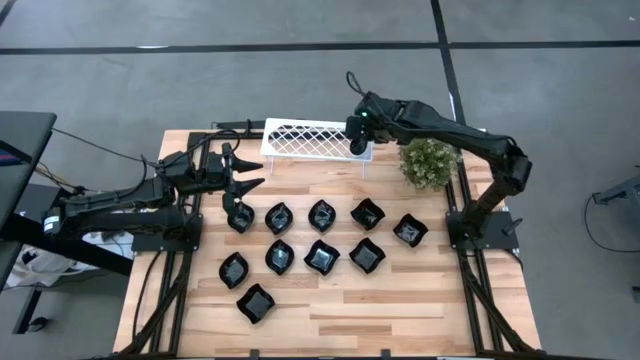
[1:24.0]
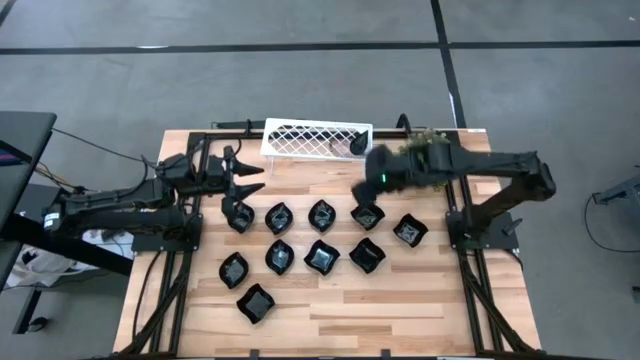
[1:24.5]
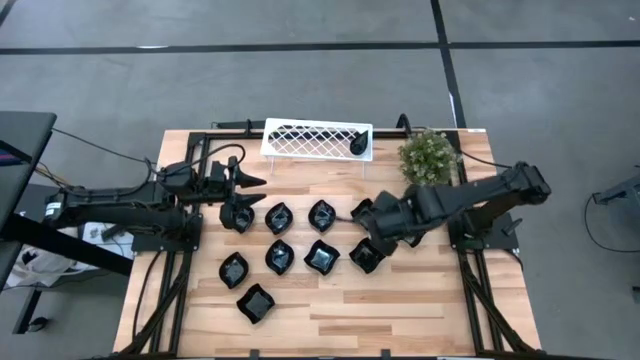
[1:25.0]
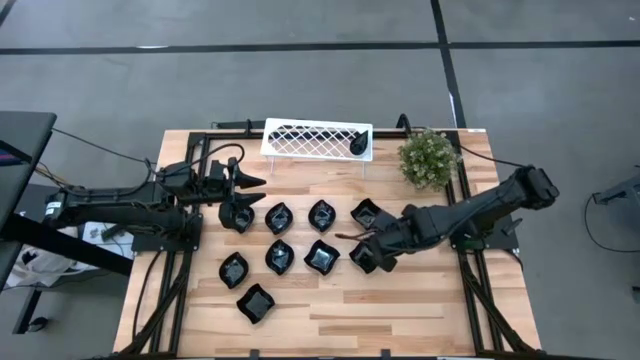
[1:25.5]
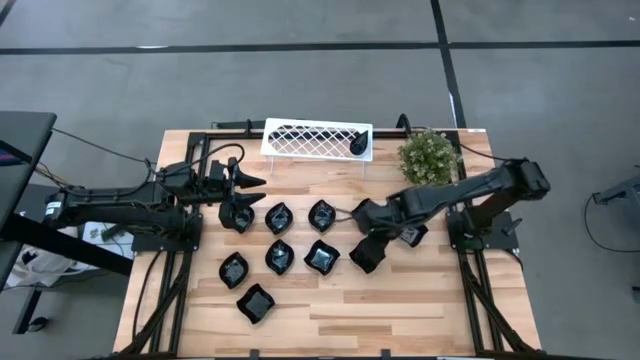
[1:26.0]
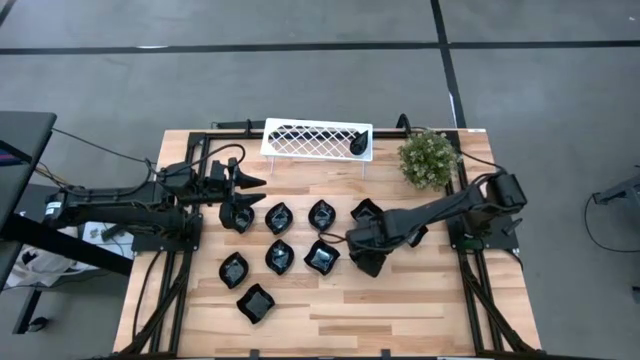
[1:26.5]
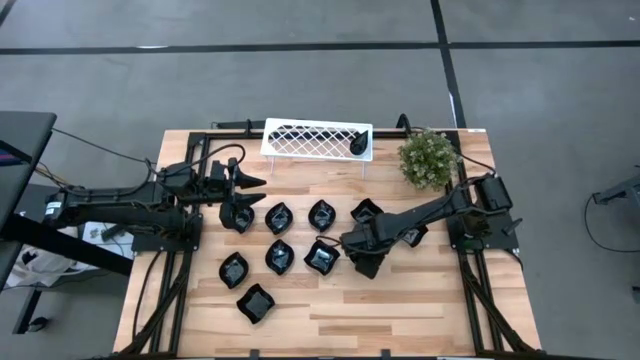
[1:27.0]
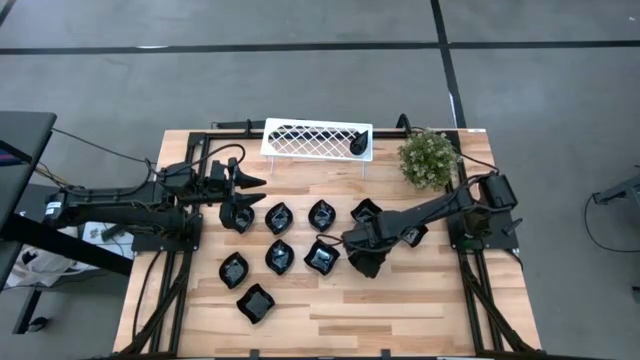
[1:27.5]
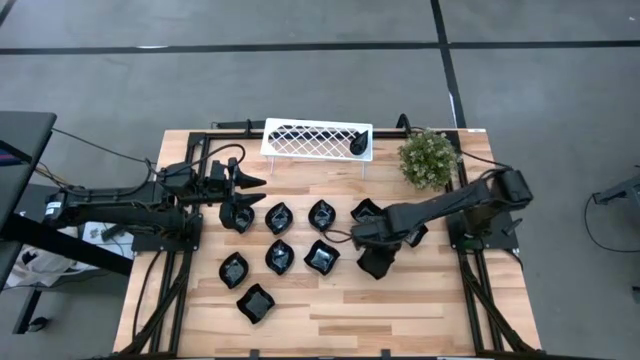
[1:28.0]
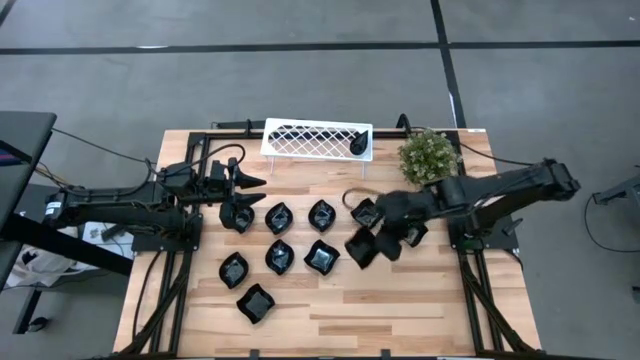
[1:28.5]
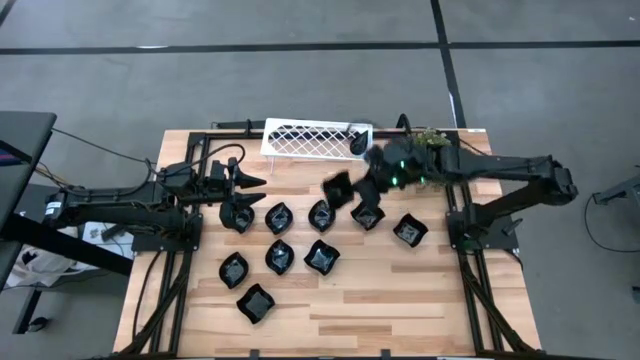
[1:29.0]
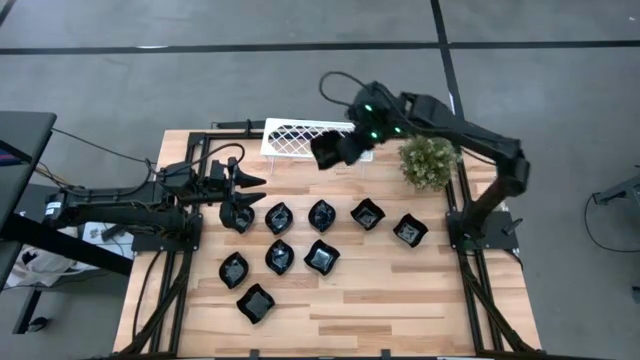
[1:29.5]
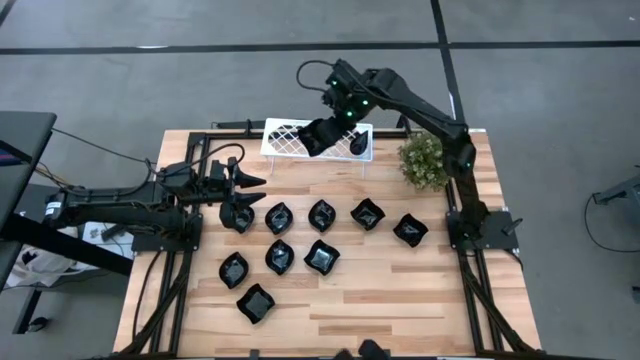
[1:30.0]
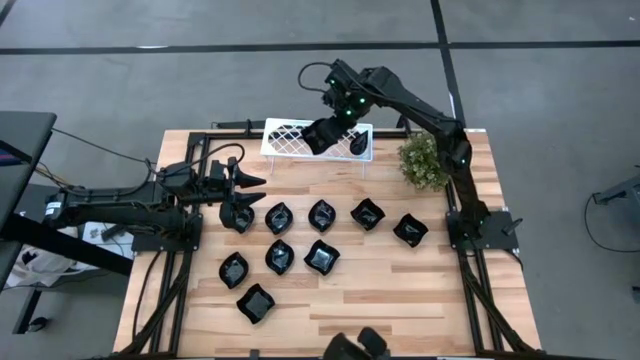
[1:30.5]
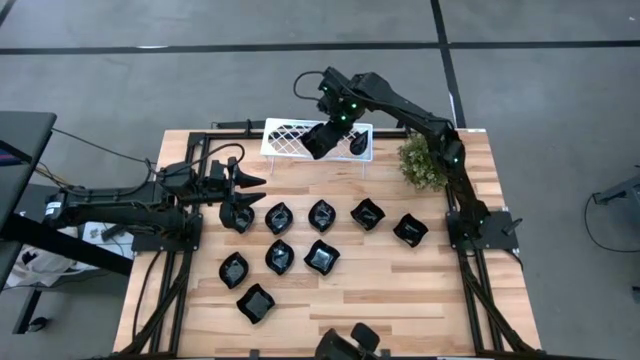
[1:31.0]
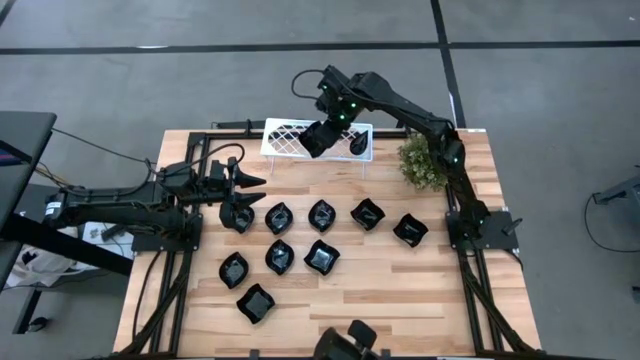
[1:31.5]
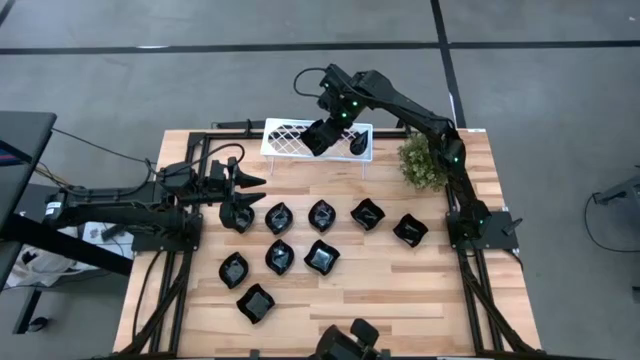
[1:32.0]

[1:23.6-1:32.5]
Task: Pick & Place Mini shaped plates
Put the black distorted square plate on the shelf

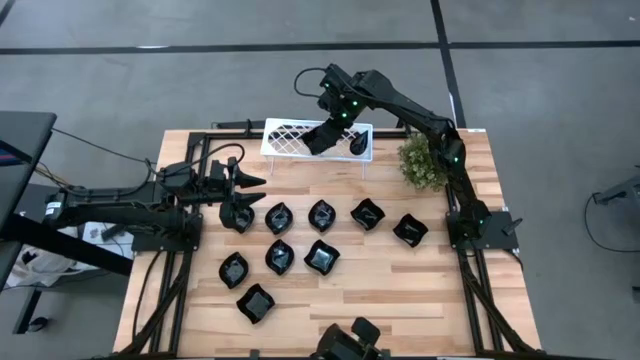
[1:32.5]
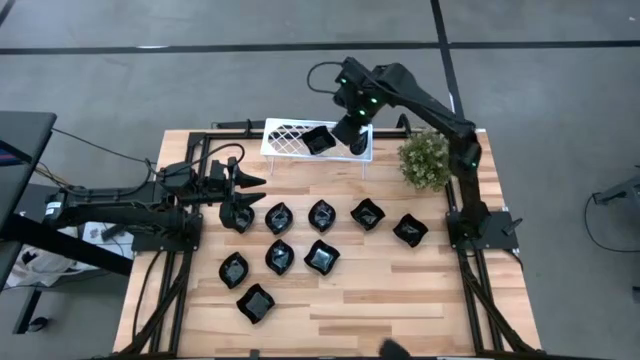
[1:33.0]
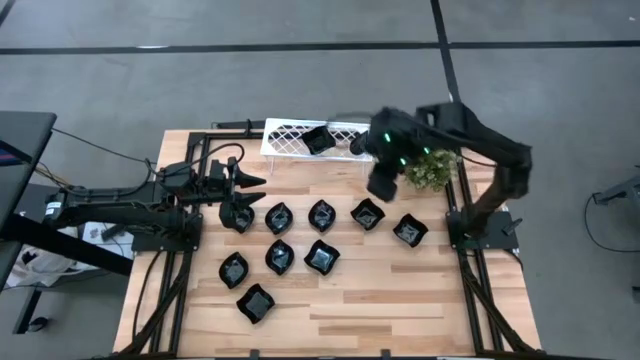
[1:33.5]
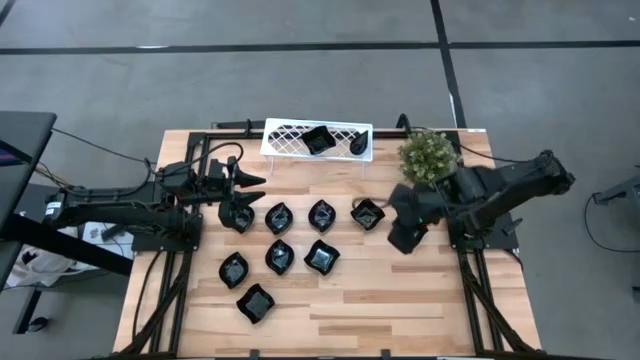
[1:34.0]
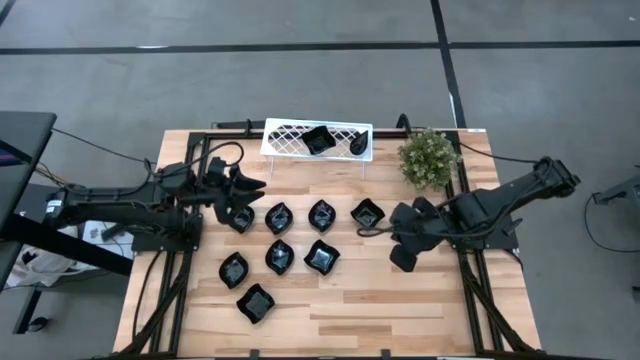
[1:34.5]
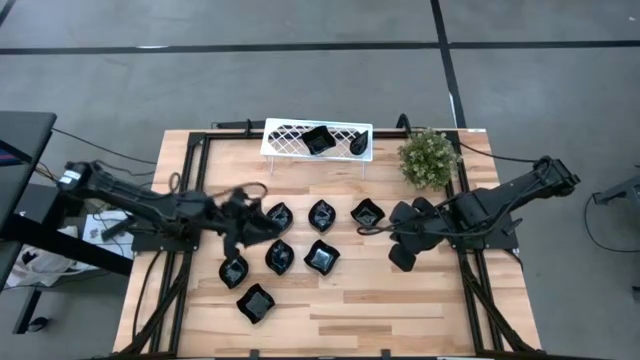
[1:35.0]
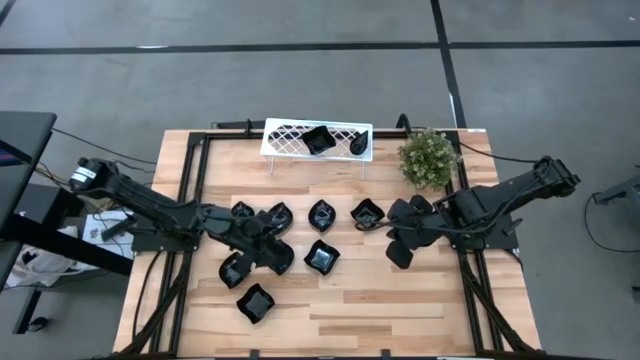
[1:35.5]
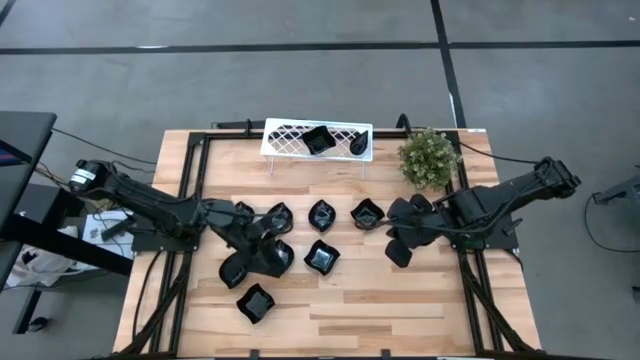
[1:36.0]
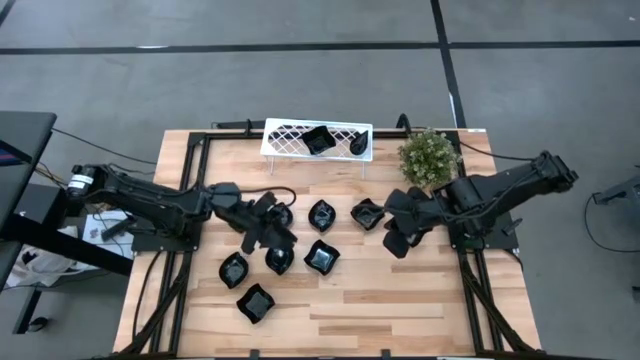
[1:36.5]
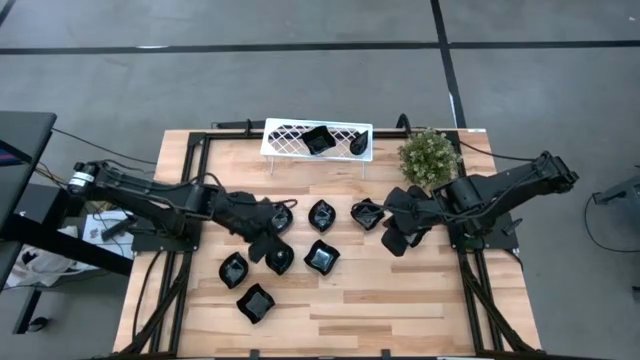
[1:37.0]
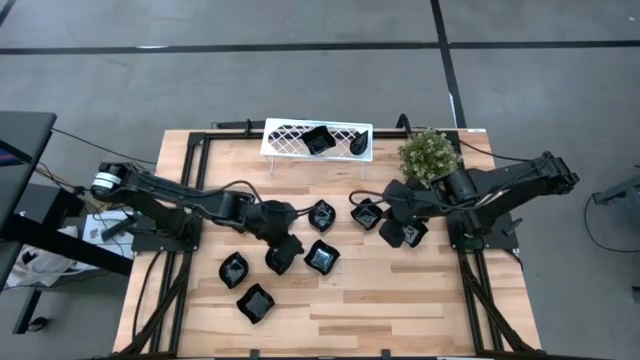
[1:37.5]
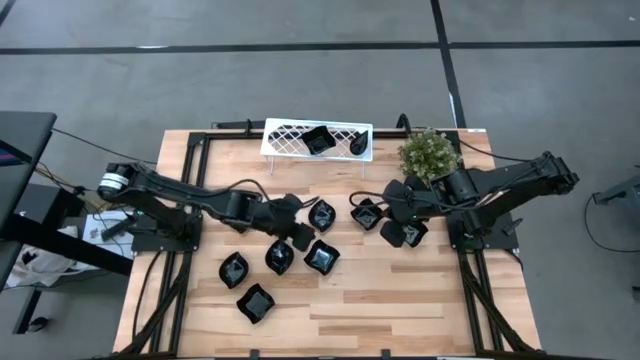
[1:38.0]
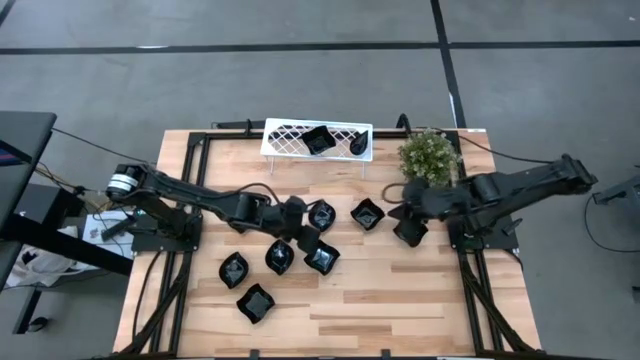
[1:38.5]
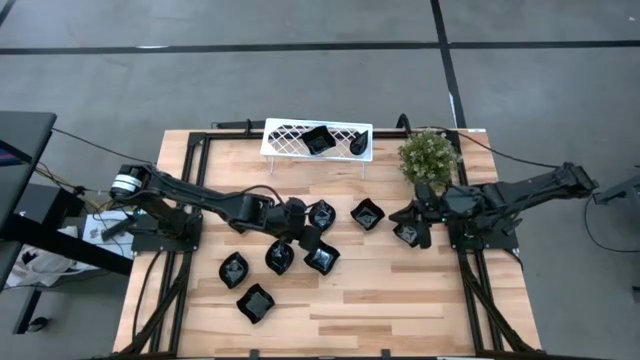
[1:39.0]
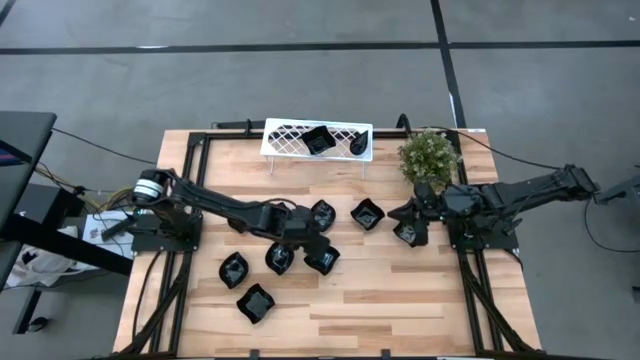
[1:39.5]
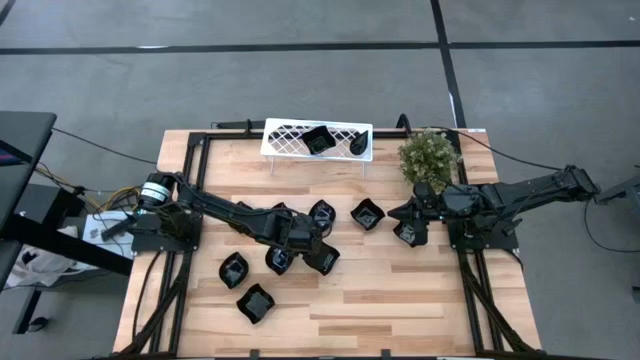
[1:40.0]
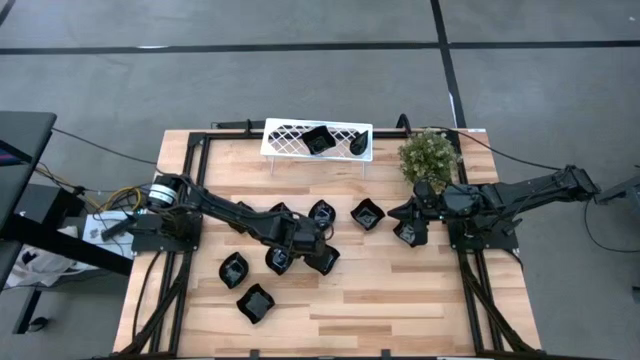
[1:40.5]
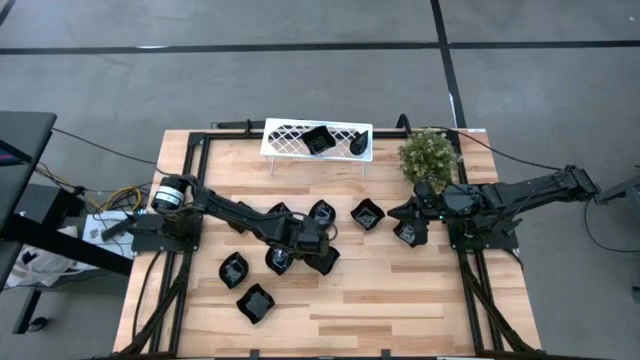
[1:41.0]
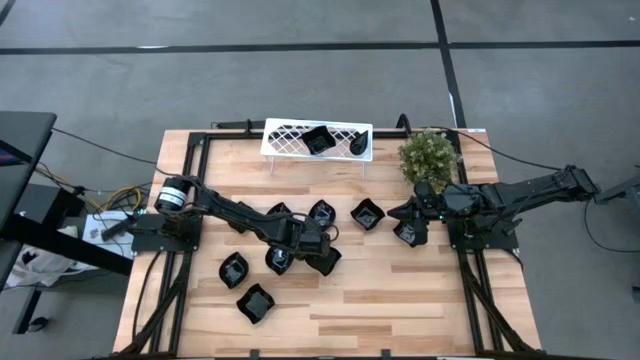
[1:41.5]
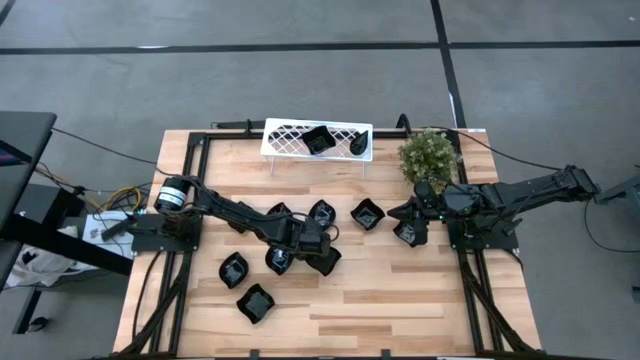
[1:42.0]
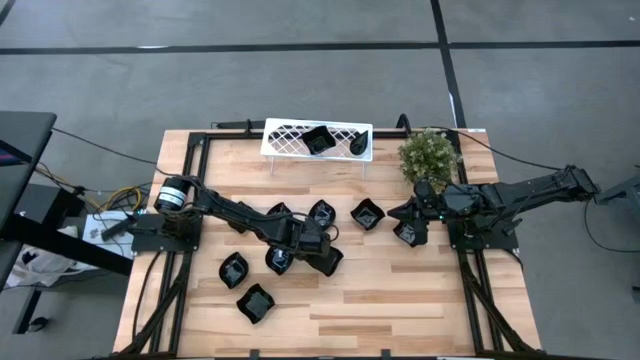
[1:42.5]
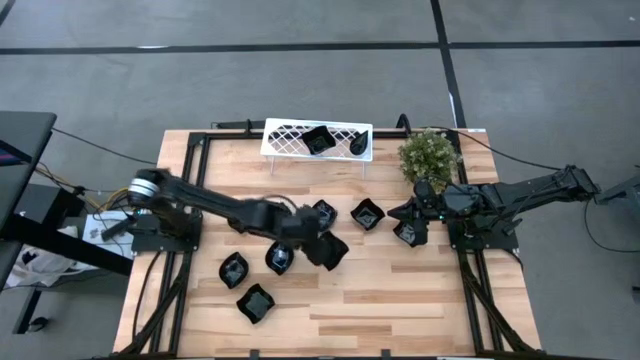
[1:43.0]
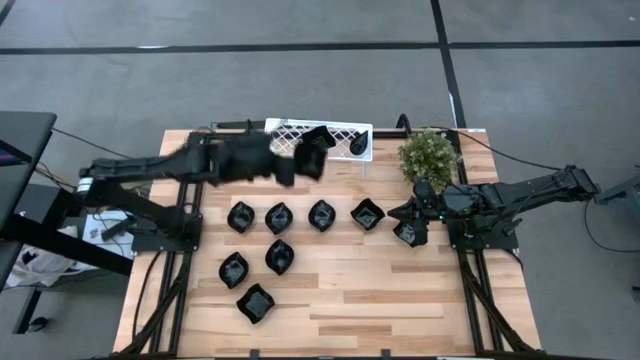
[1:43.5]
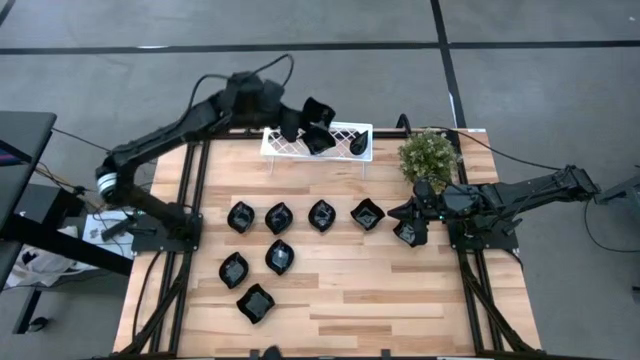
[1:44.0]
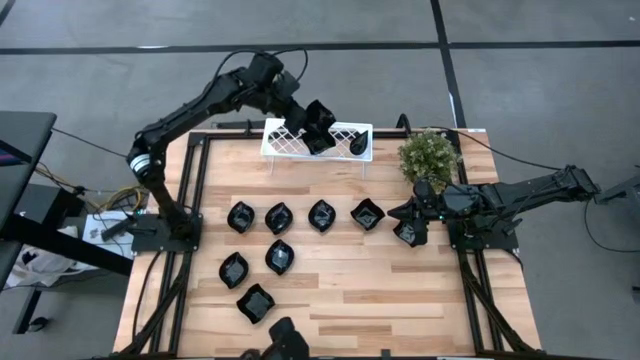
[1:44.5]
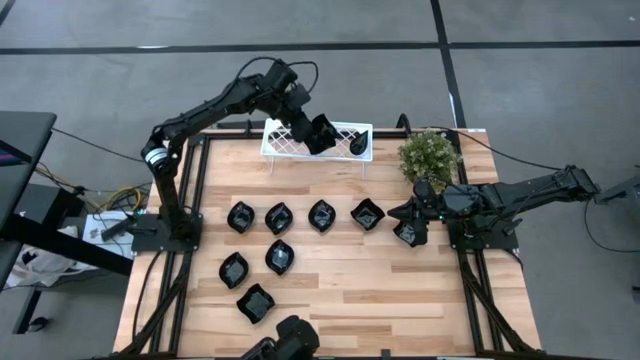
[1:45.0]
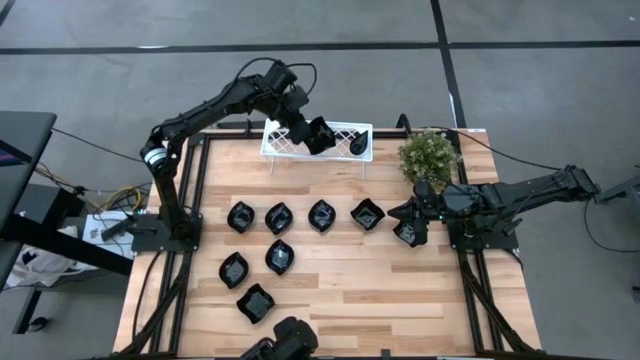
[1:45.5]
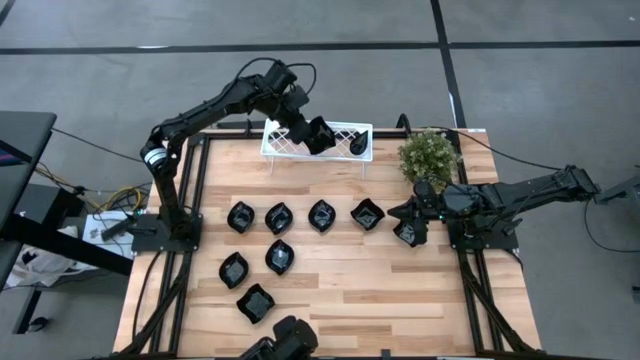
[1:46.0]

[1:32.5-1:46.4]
Stack the black distorted square plate on top of the black distorted square plate on the shelf
